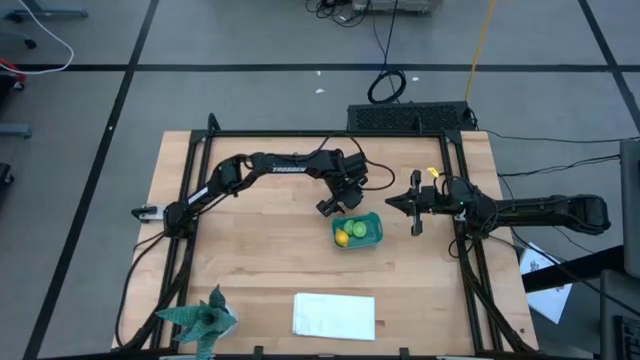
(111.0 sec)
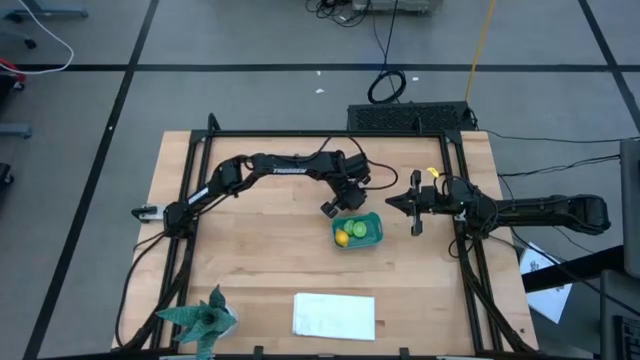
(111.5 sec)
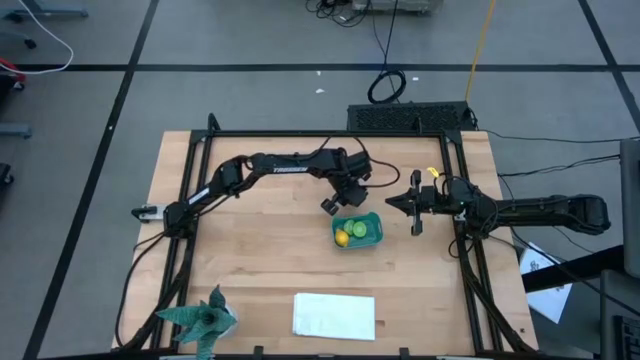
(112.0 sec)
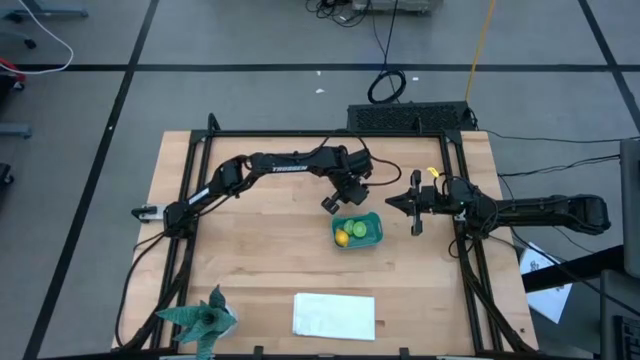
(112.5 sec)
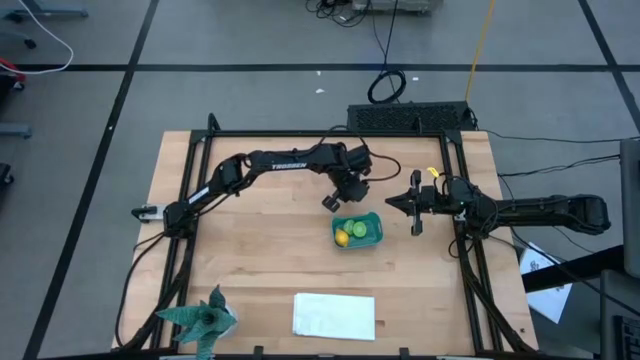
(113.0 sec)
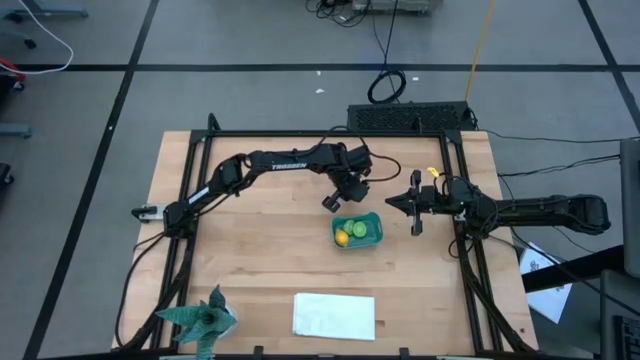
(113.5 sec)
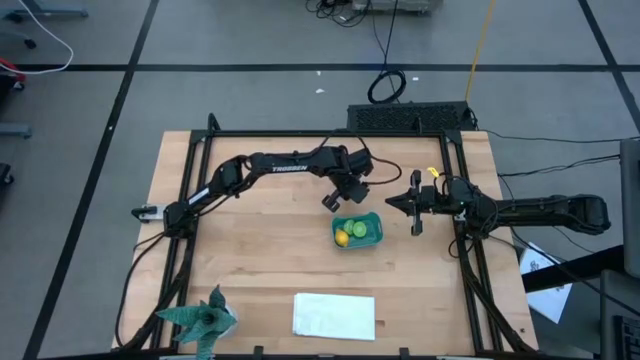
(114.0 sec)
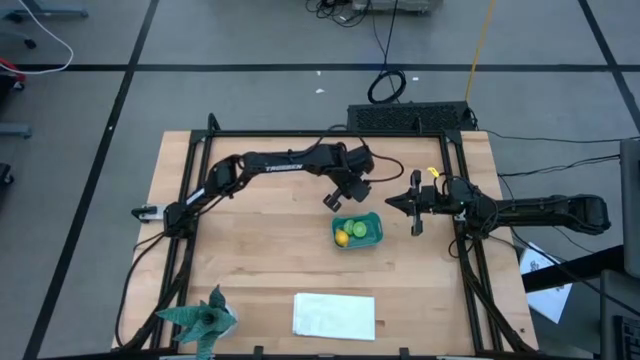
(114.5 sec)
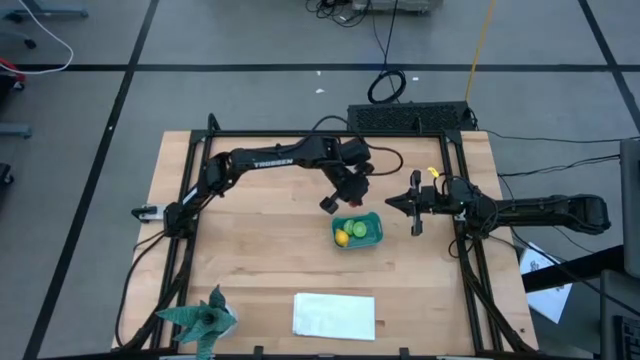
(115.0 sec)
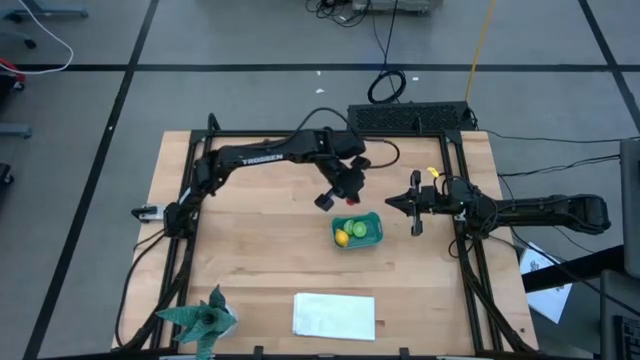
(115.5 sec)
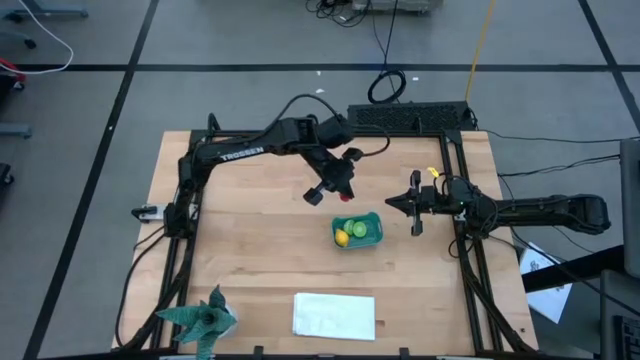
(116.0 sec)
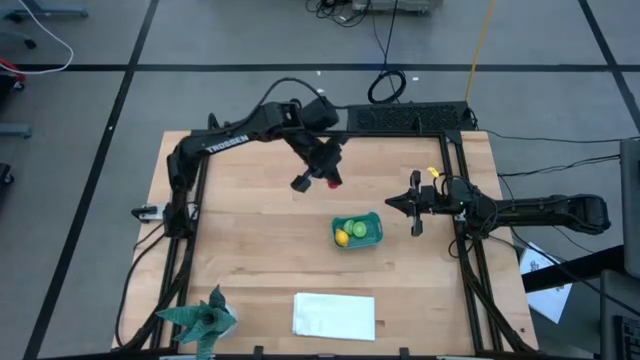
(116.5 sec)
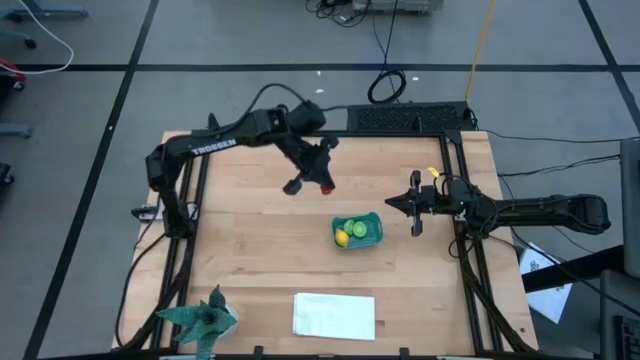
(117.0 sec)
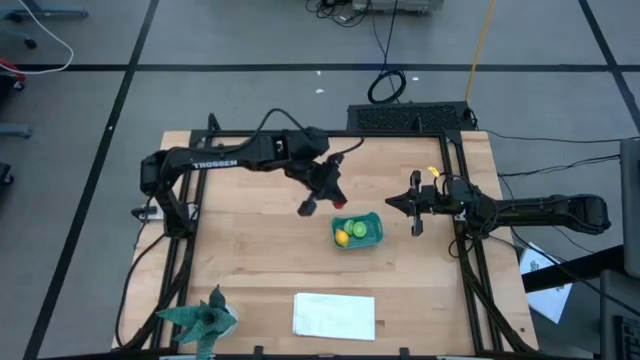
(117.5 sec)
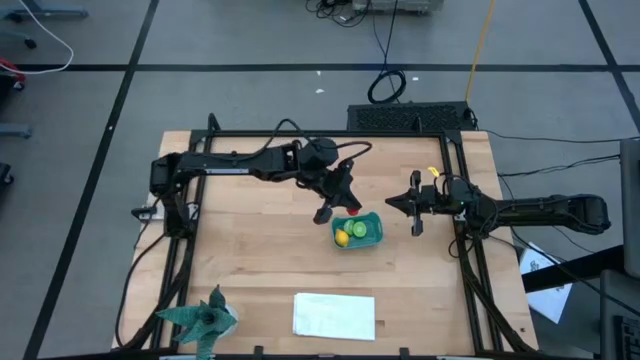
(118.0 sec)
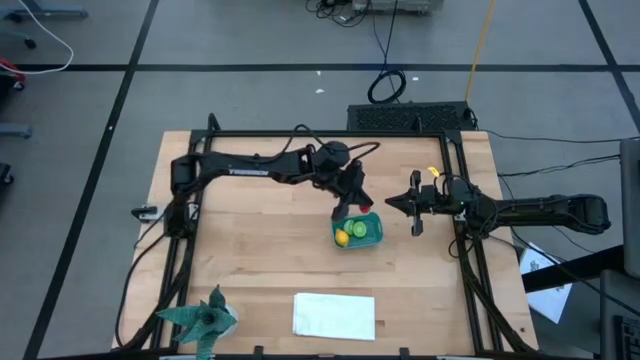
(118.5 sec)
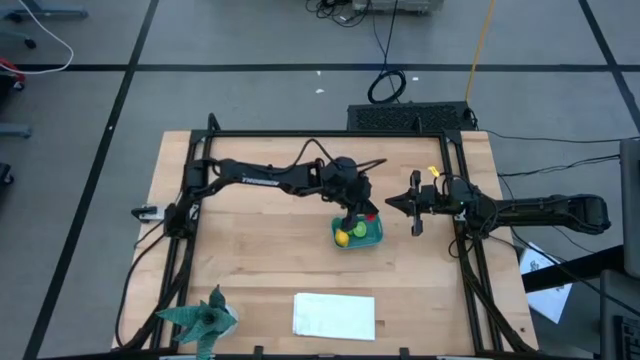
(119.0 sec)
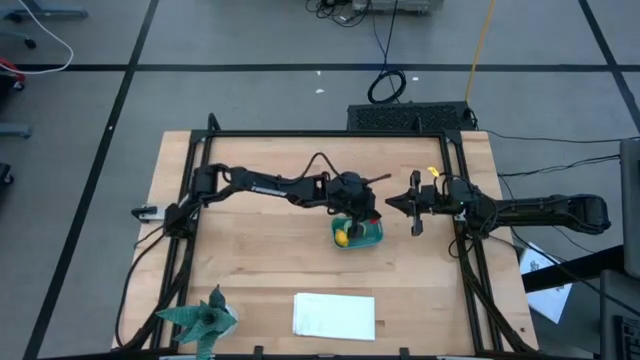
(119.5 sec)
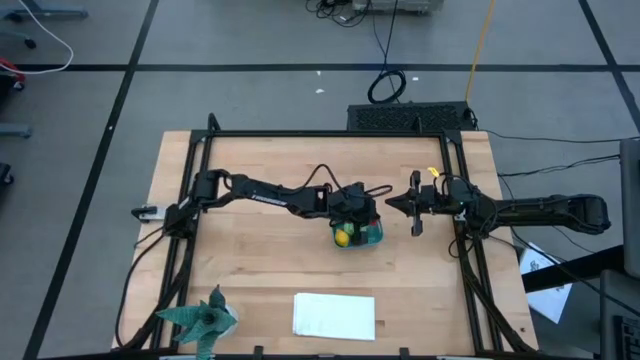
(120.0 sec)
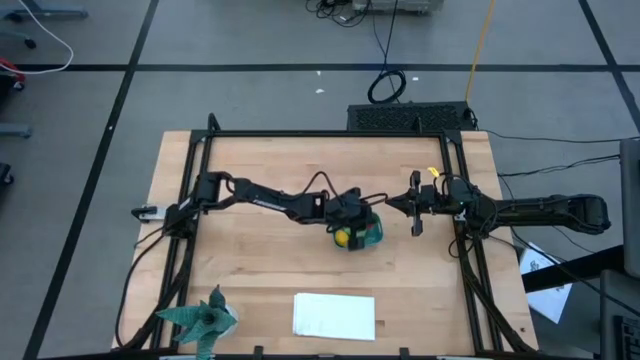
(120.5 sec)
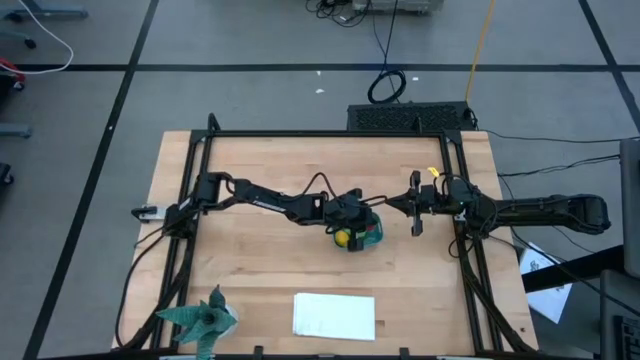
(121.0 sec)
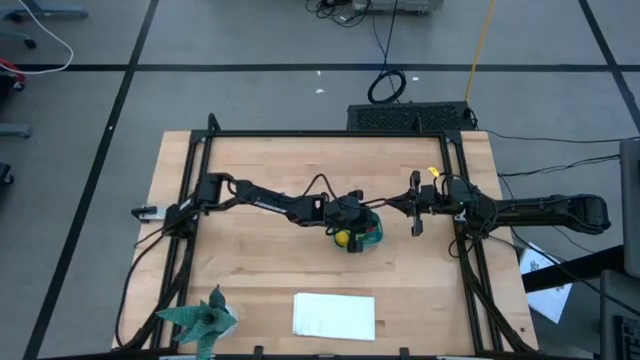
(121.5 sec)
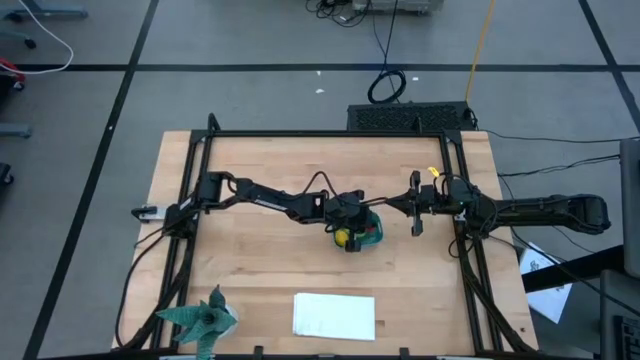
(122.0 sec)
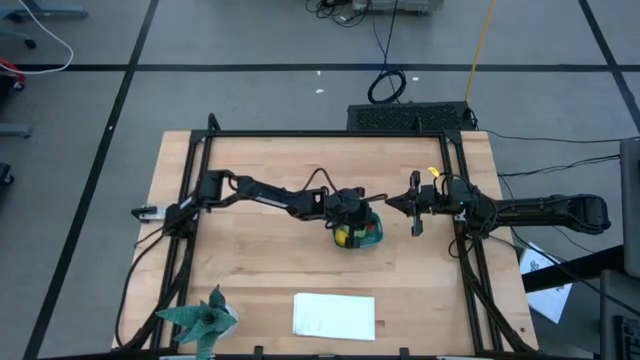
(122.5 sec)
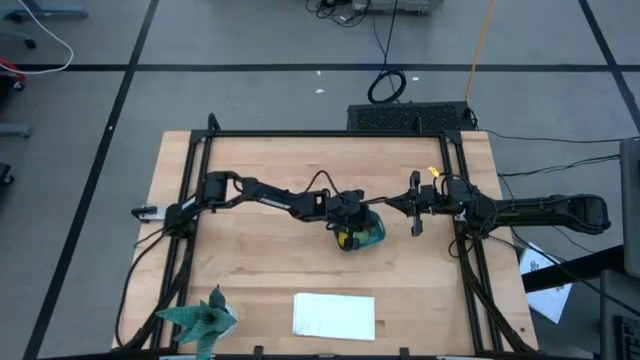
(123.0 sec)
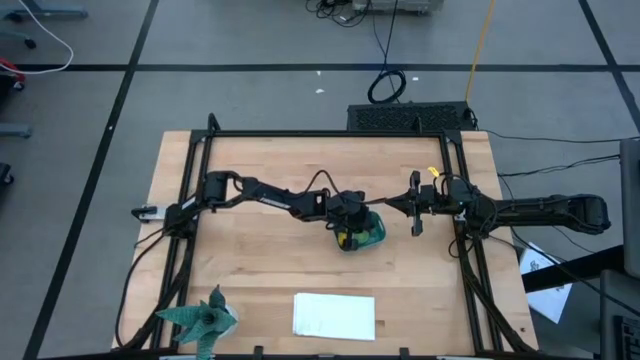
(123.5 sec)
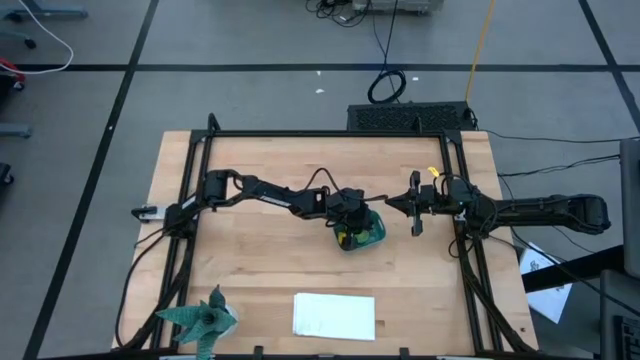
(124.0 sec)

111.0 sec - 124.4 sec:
Task: Pick and placing Produce into tupperware
Put the red strawberry into the green bin

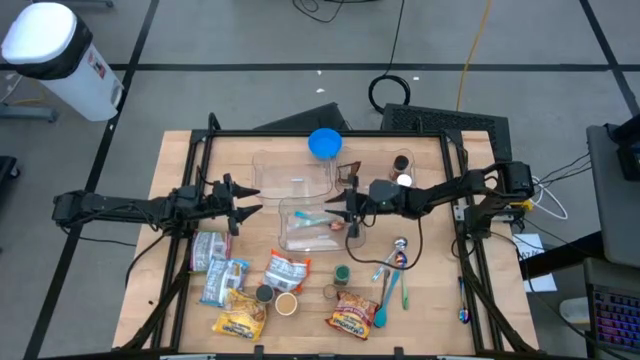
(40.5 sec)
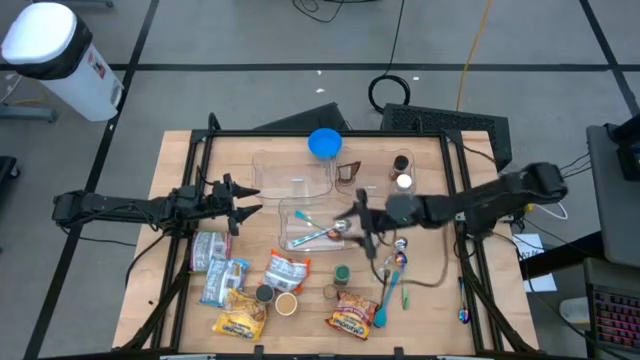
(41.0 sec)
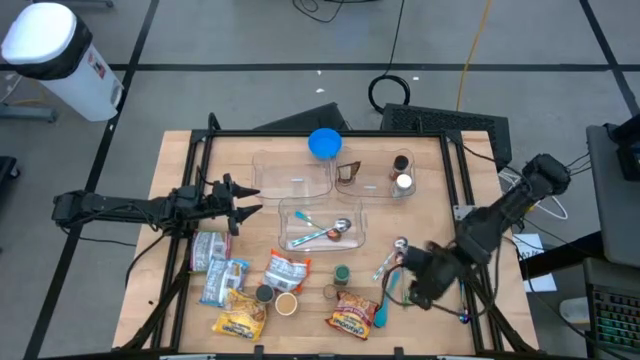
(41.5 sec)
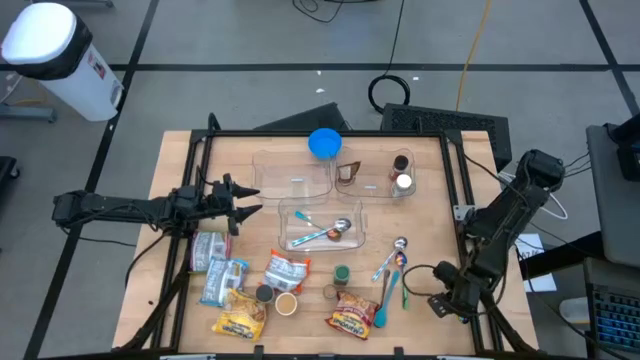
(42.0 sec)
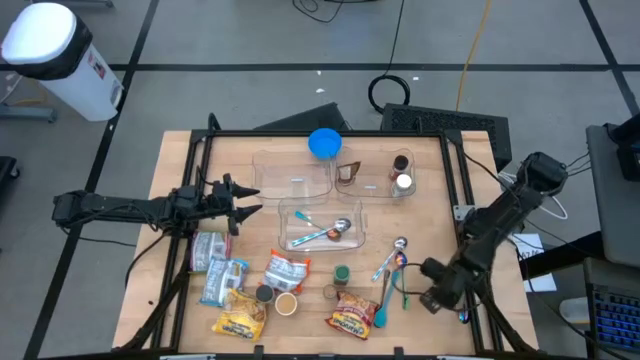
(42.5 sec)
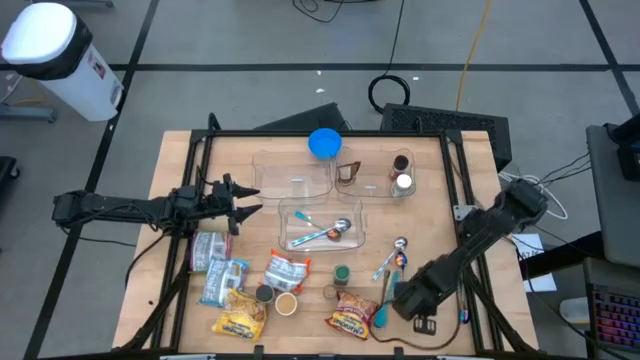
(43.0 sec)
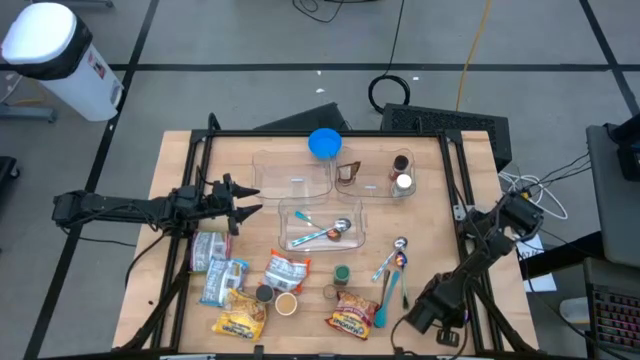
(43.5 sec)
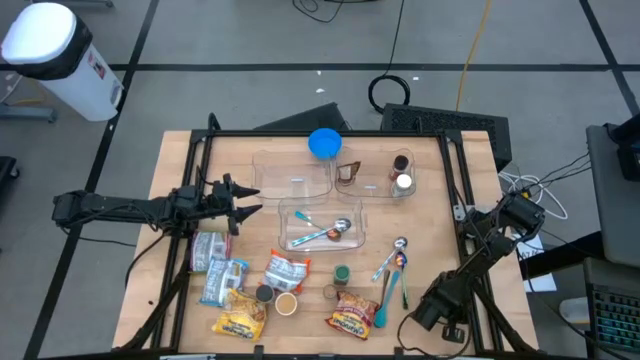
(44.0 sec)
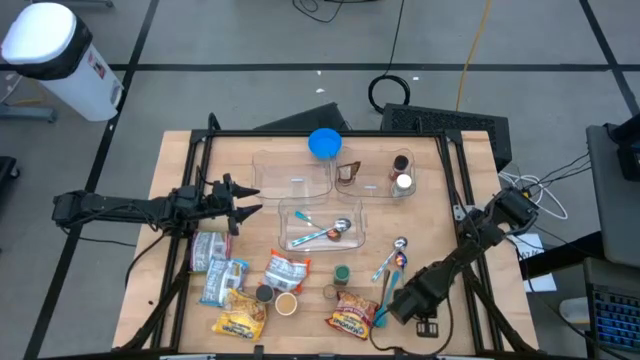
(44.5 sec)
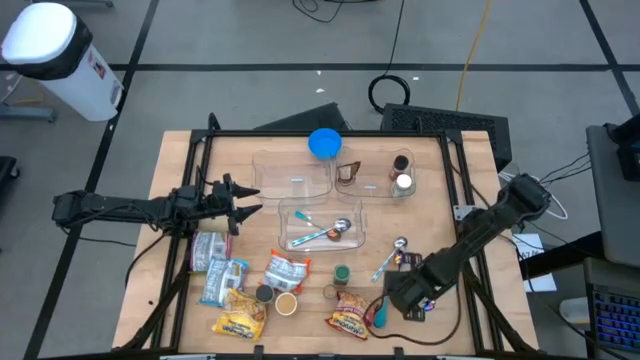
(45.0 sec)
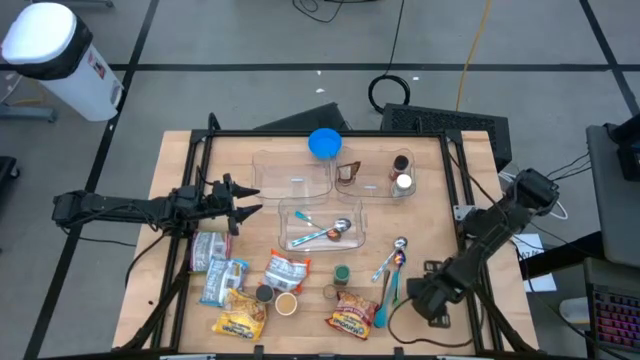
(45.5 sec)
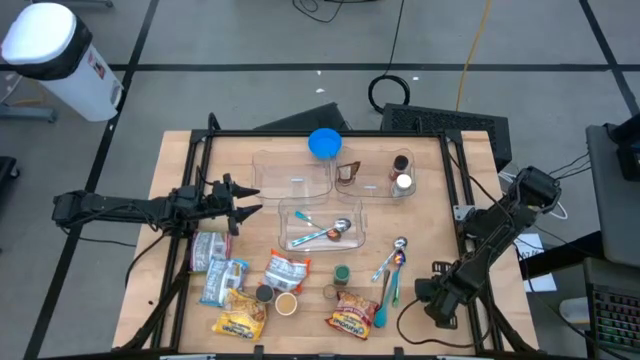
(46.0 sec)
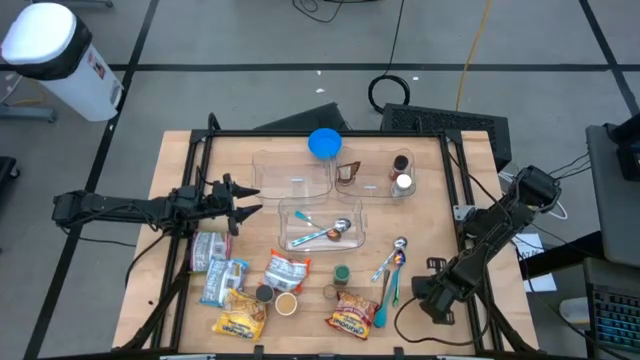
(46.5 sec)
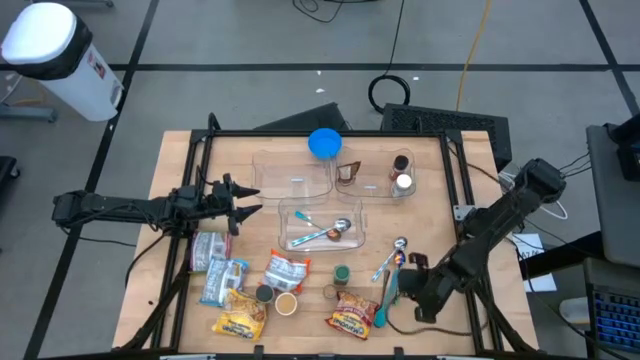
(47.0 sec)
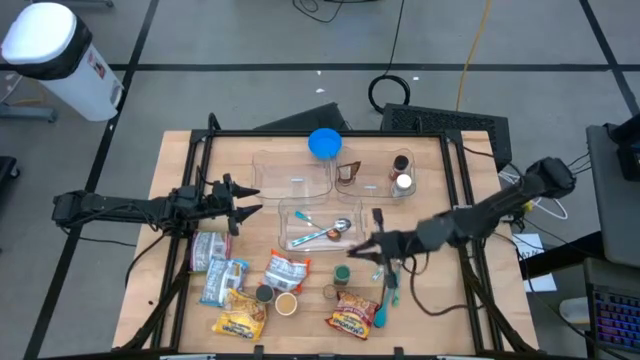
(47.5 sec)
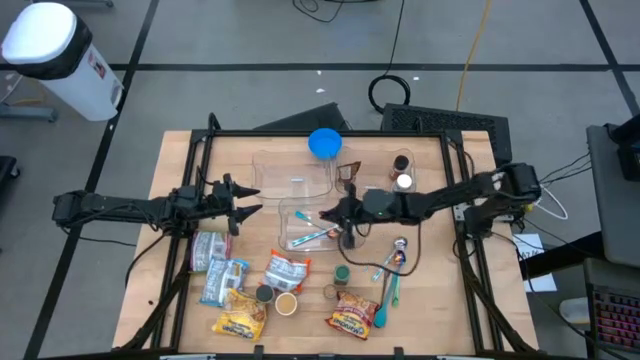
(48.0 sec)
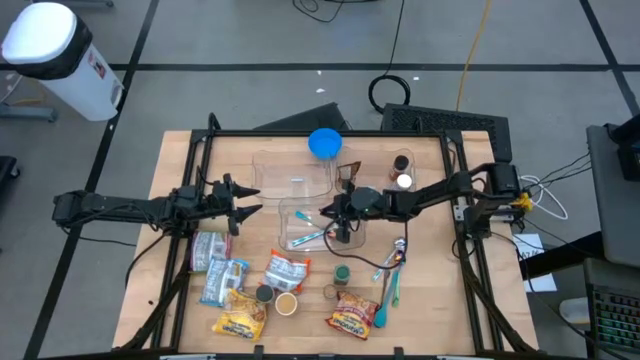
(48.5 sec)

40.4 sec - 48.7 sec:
Task: Pick & Place Food Item
Put the right blue spoon into the bottom transparent bin
